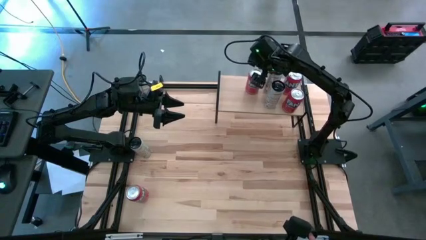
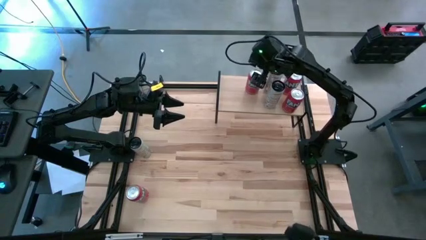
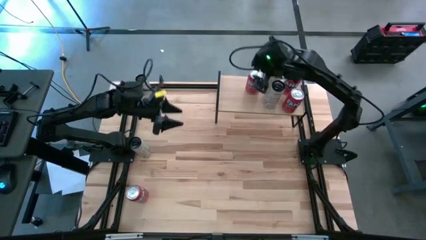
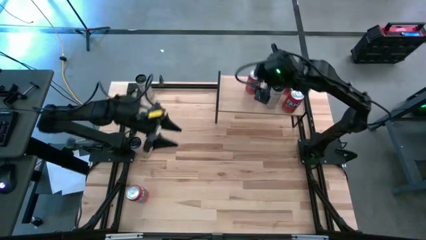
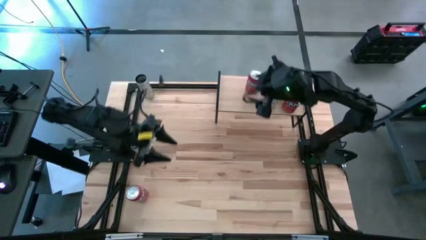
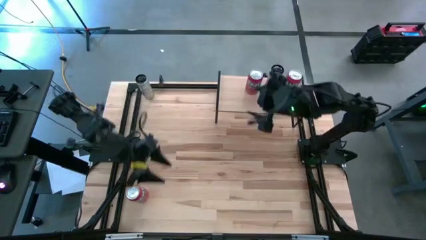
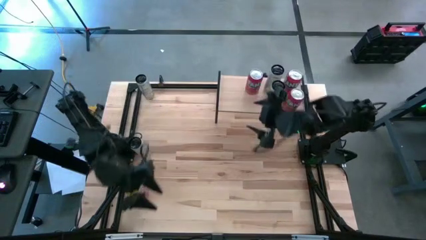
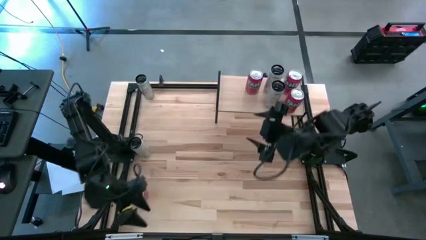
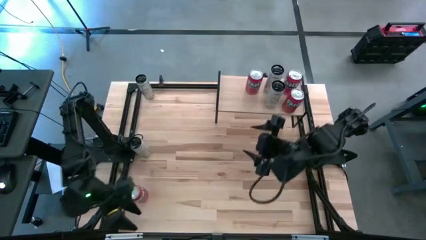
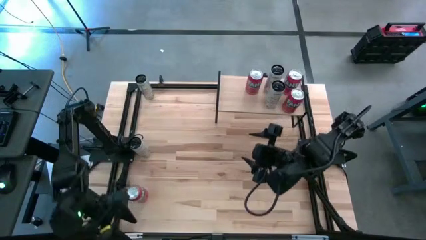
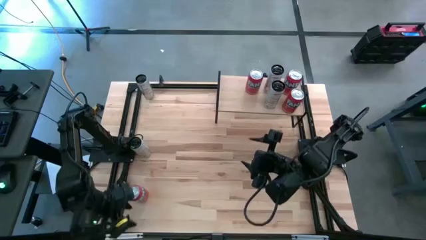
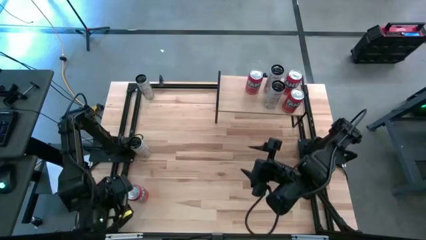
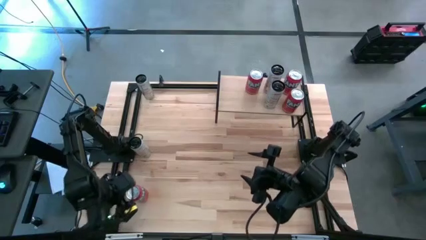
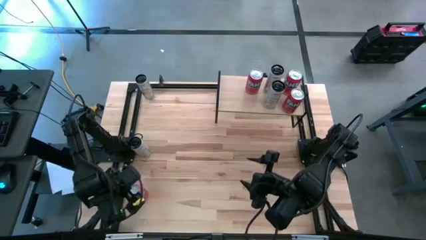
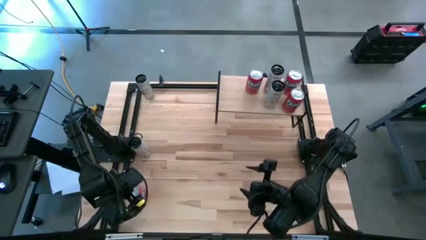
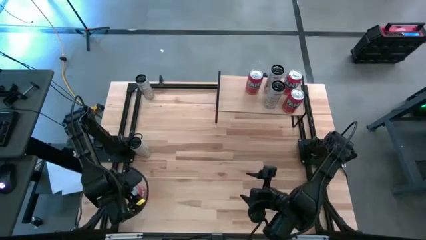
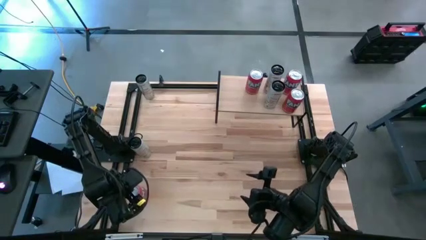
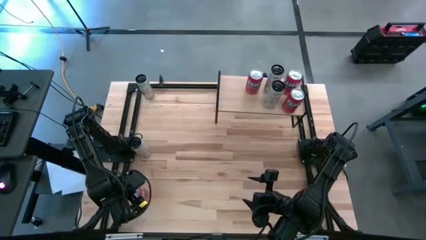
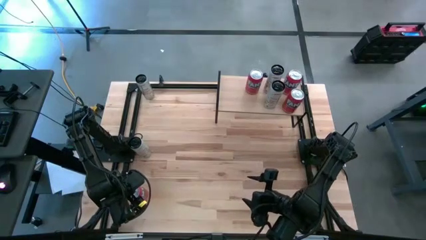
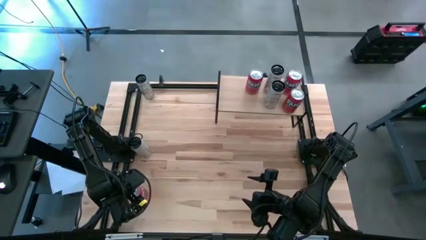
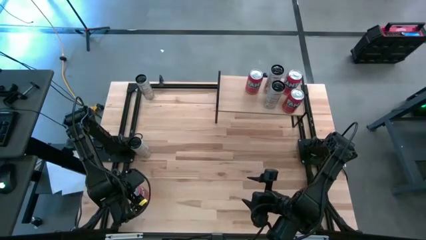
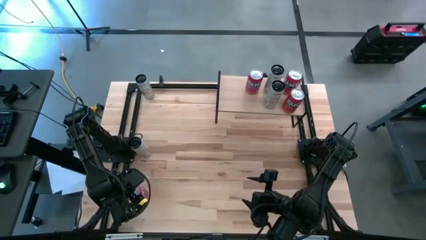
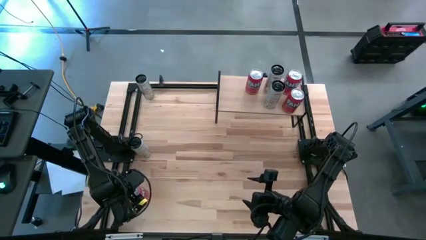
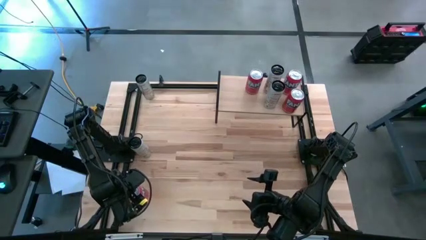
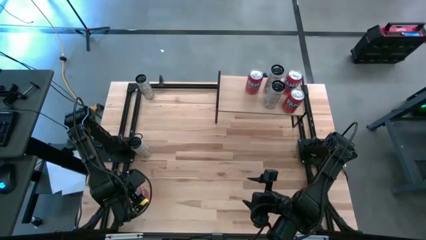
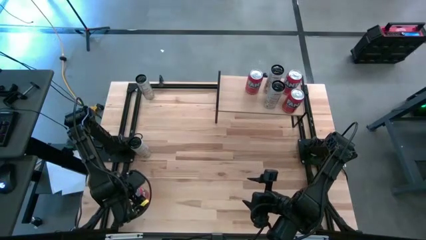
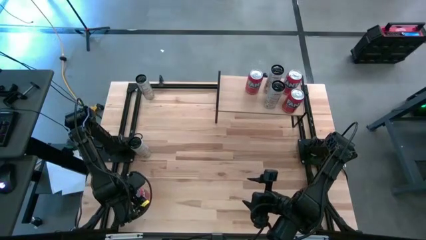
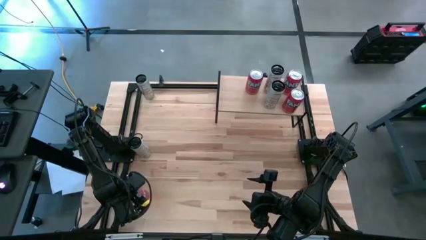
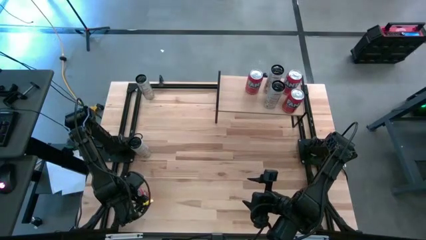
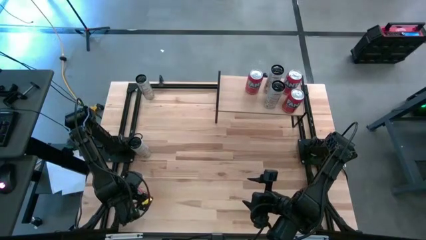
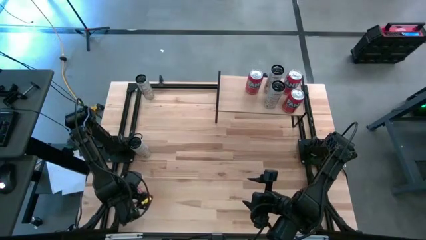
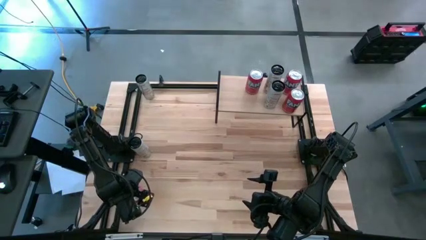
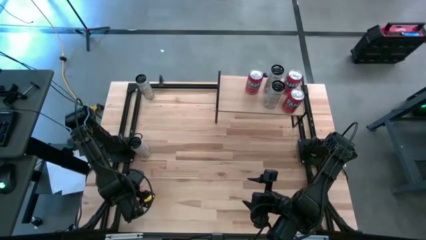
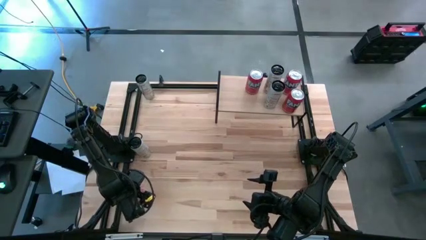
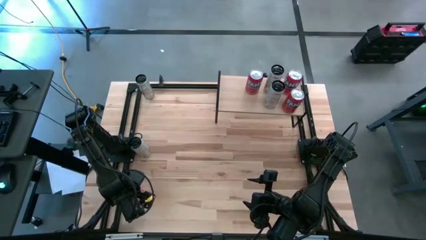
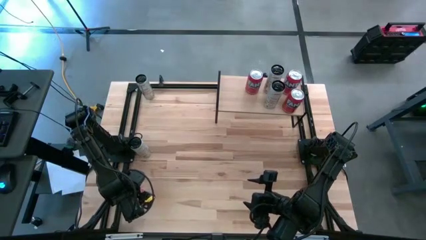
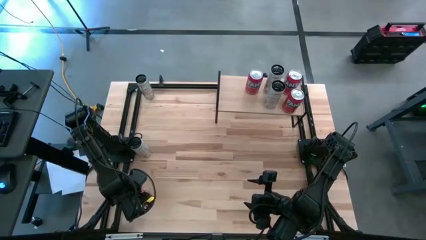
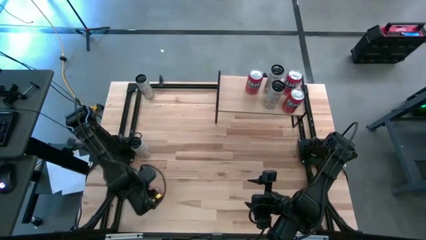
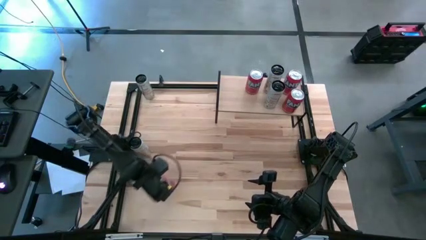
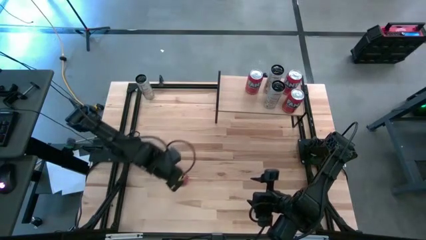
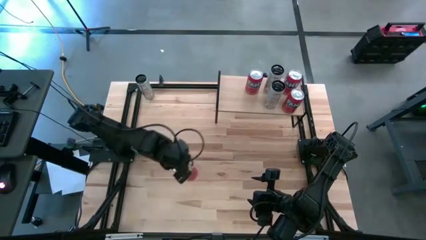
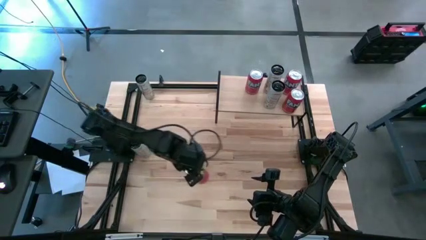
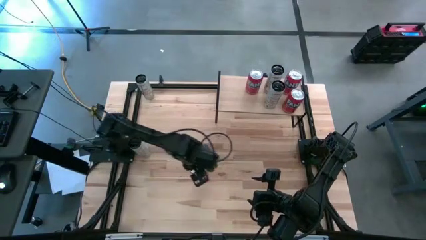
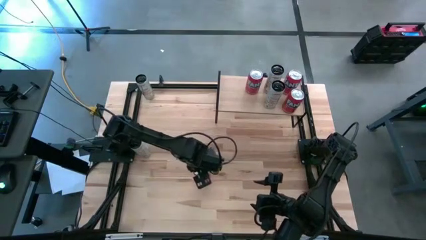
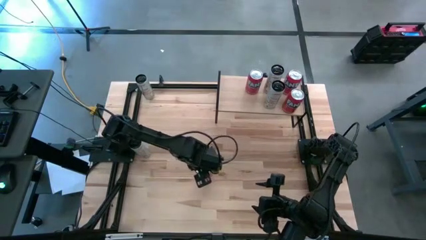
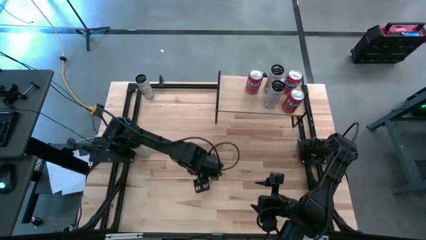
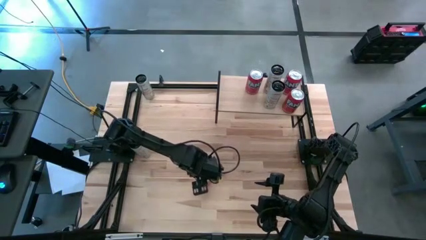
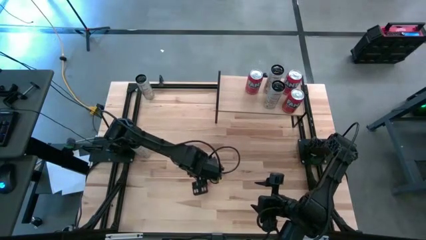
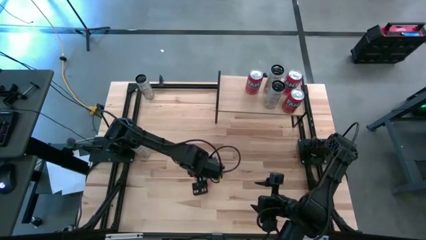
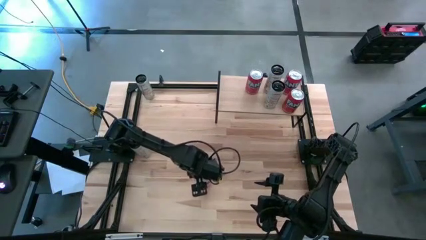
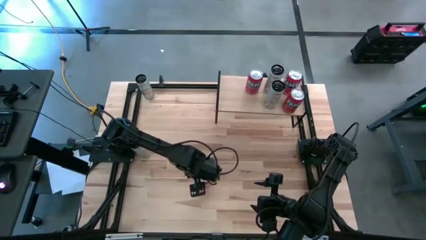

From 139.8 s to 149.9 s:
Task: Place canned beverage on shelf
Put the orange soda can on the shelf aligned with the other orange soda can

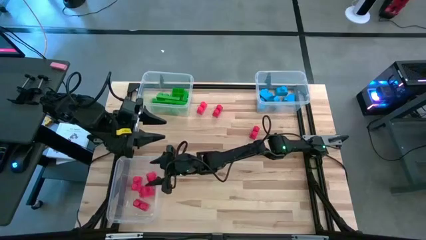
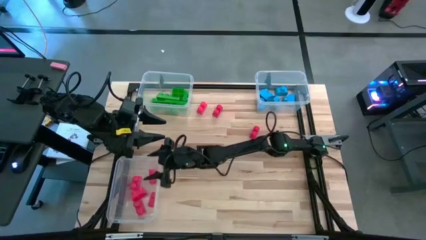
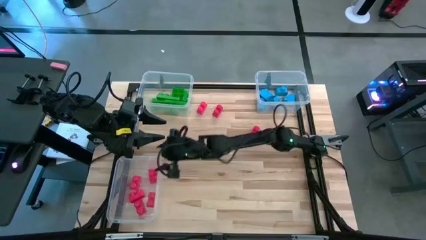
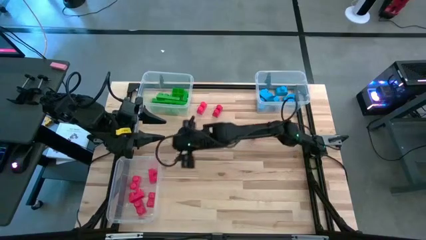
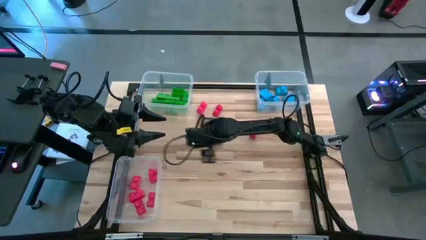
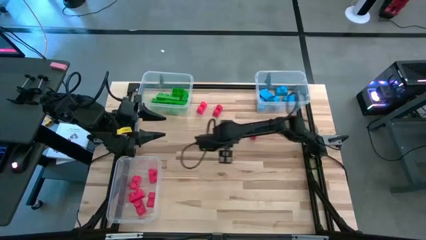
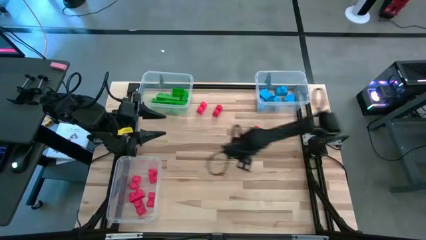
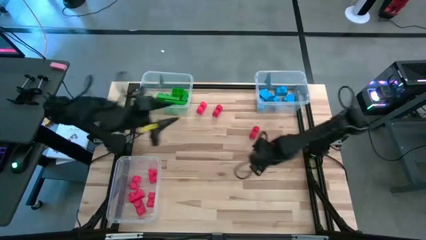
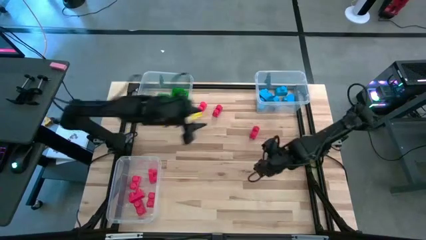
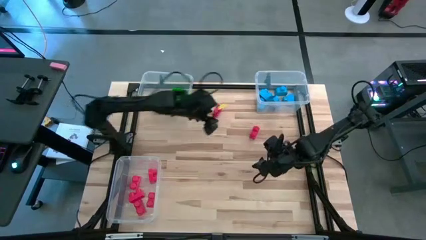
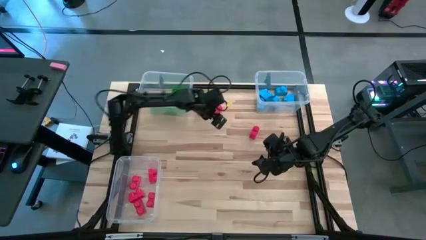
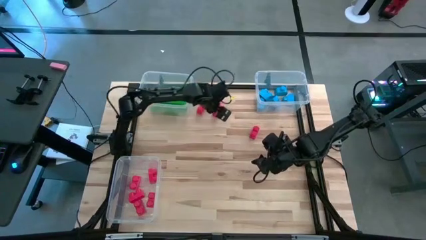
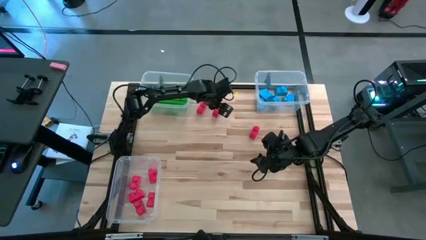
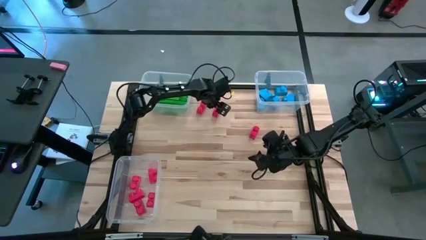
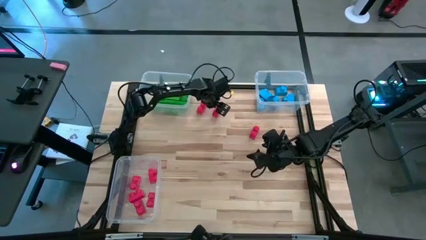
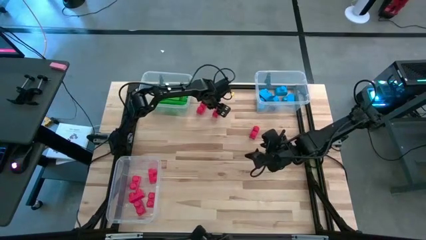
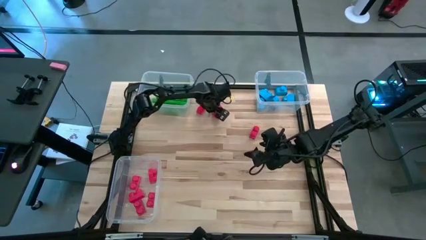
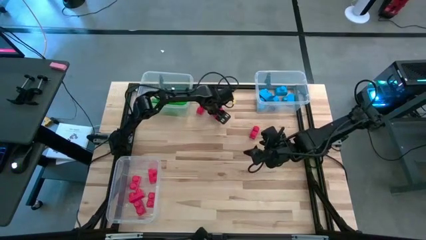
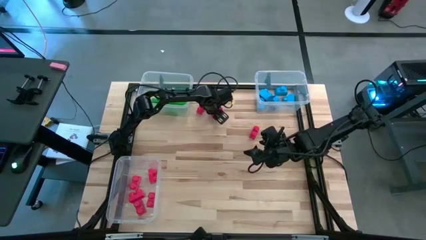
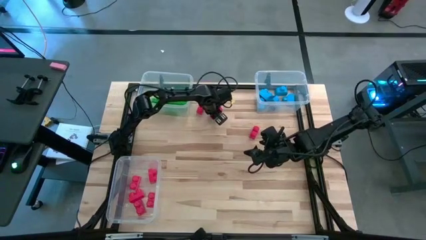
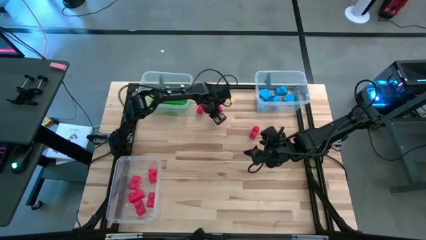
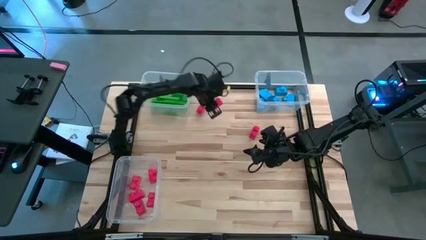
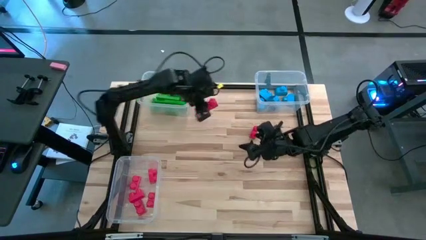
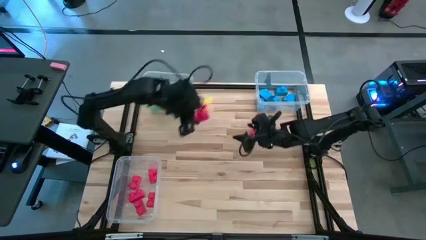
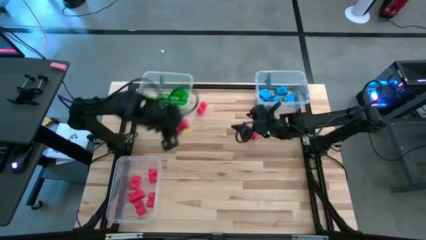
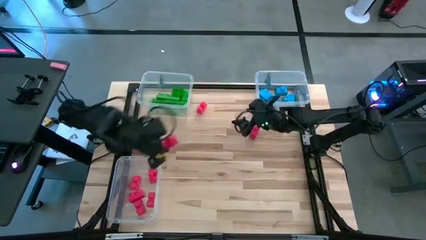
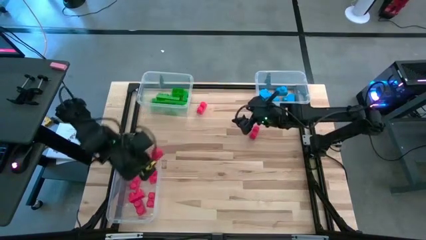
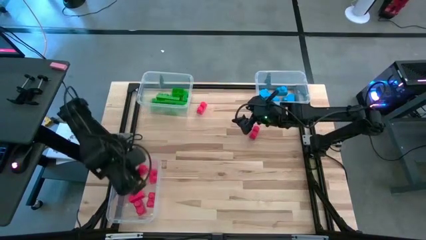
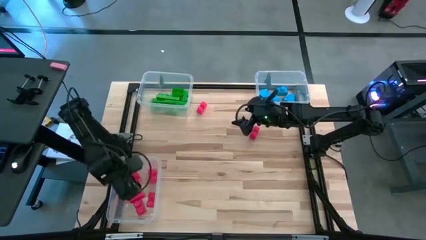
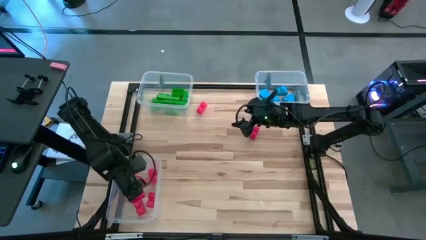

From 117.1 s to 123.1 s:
Task: Sort blocks
Put the red game piece into the bottom left transparent bin
